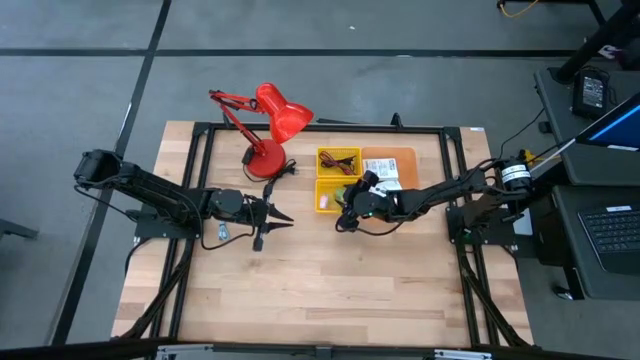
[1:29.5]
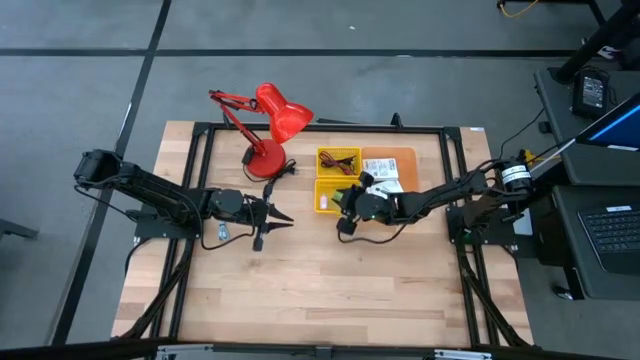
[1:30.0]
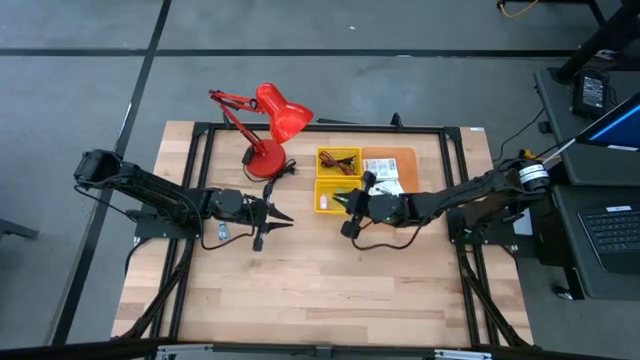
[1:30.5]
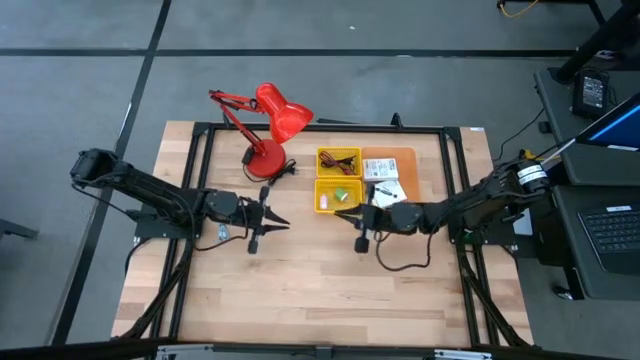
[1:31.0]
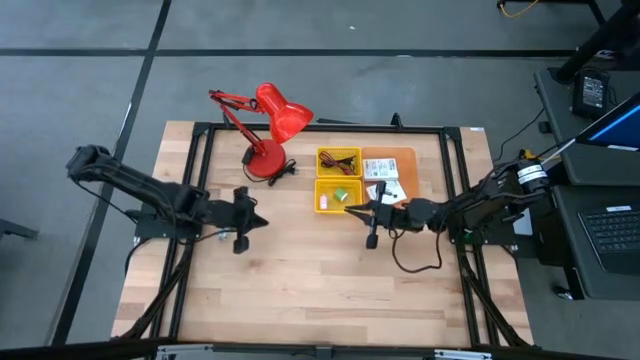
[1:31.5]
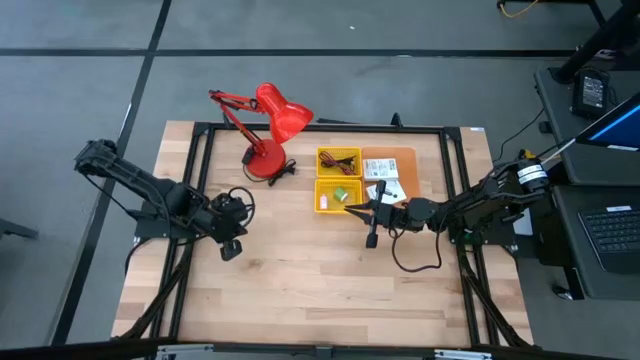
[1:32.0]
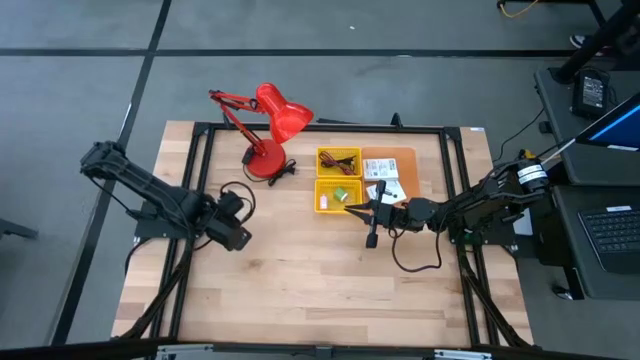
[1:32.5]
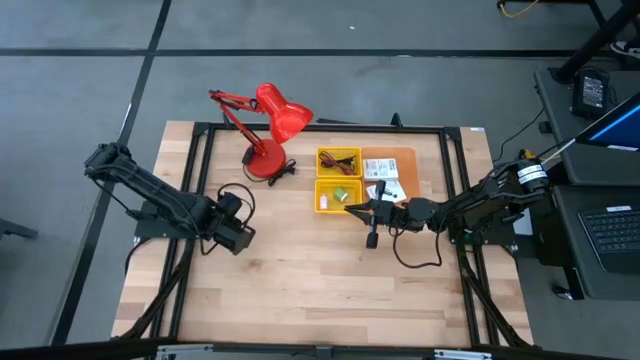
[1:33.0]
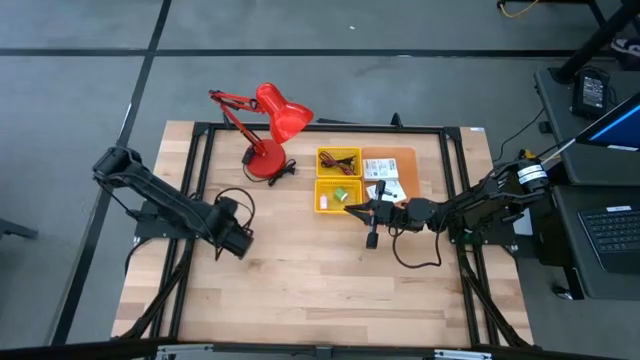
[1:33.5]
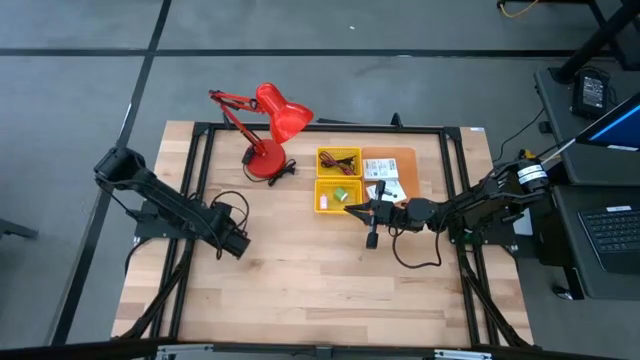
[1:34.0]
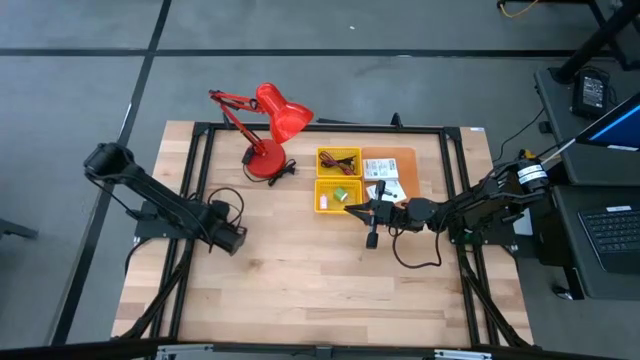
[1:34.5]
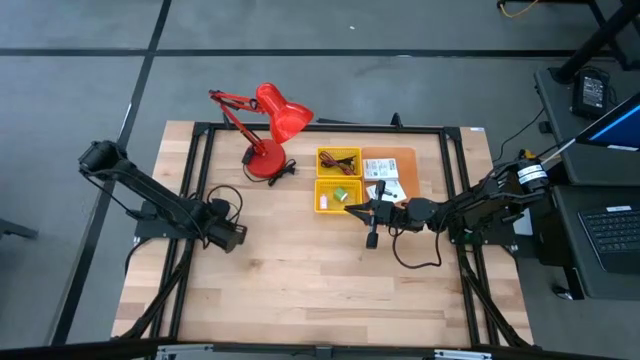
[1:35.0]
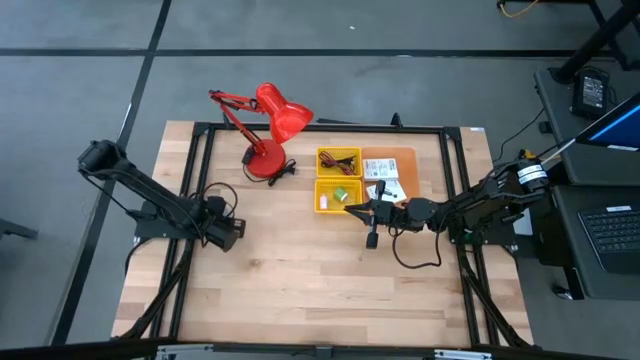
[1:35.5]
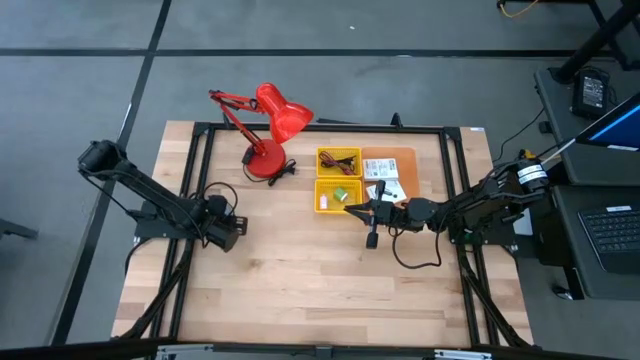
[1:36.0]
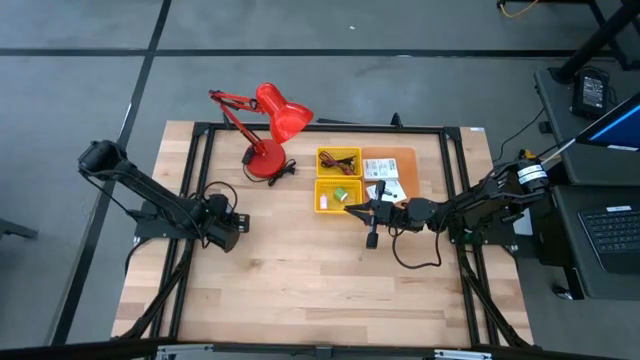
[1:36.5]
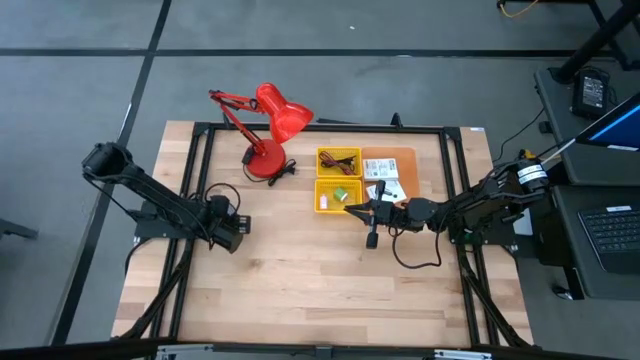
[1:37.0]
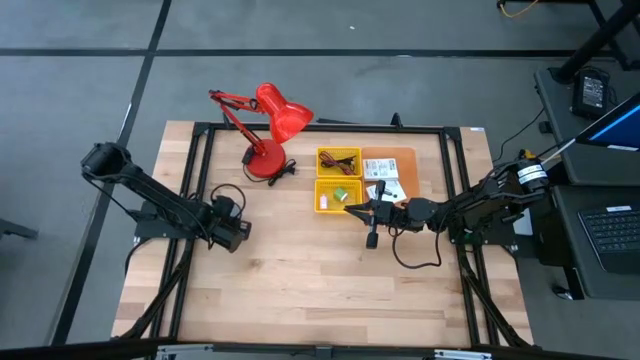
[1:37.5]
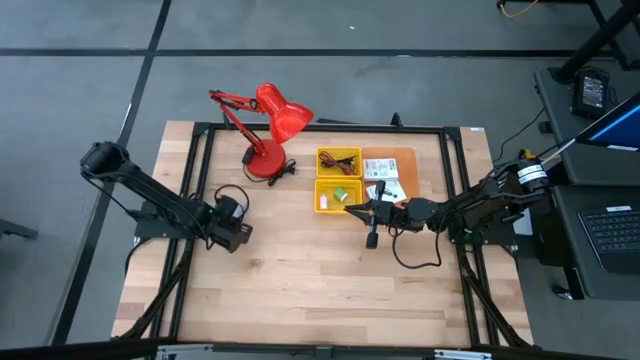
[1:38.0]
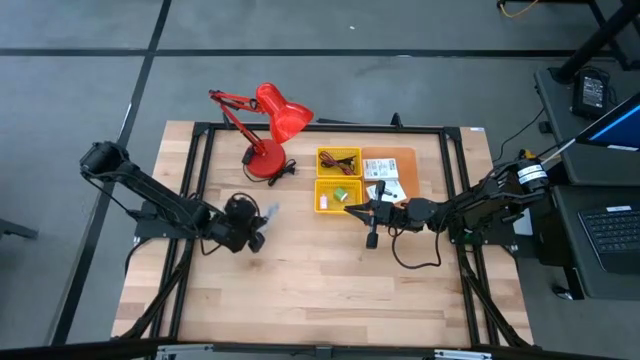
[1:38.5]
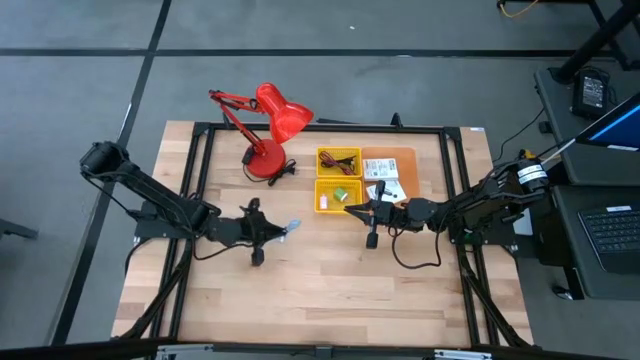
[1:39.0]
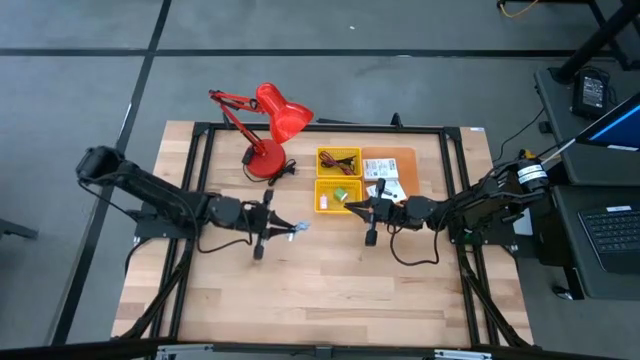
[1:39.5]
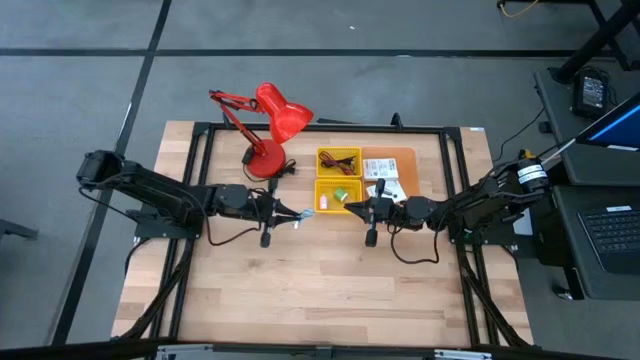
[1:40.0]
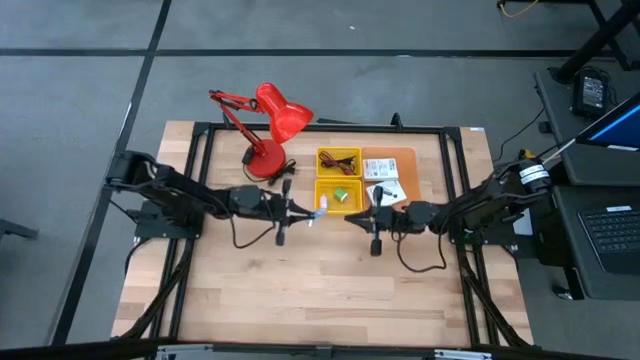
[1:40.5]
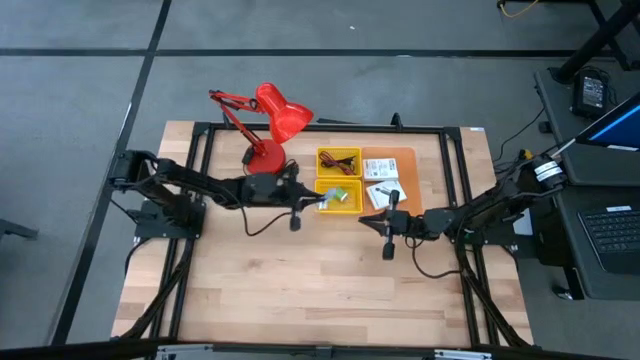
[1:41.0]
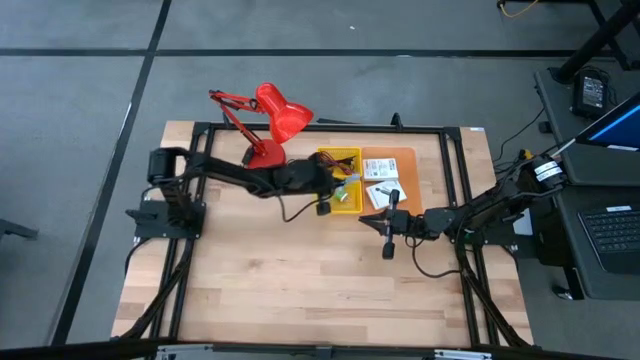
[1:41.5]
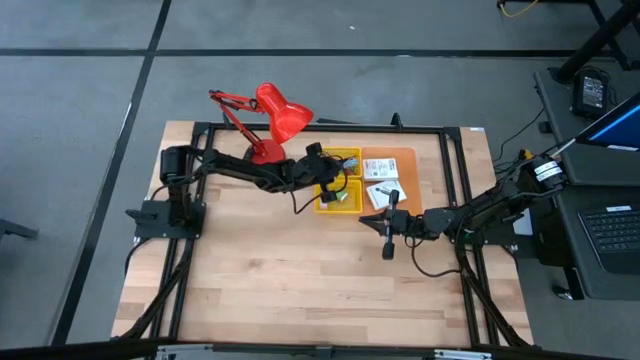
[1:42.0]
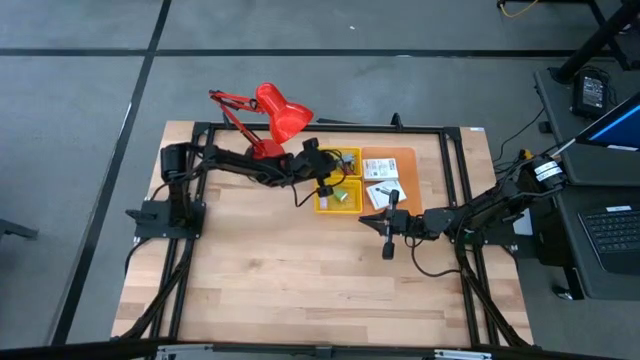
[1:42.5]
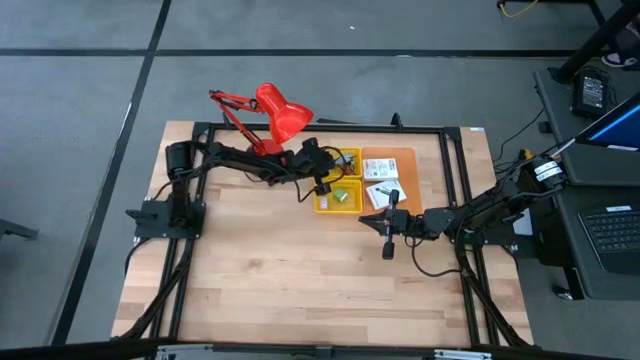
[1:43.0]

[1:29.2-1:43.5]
Task: Pick and place items into bin
Put the blue charger cable into the top yellow bin

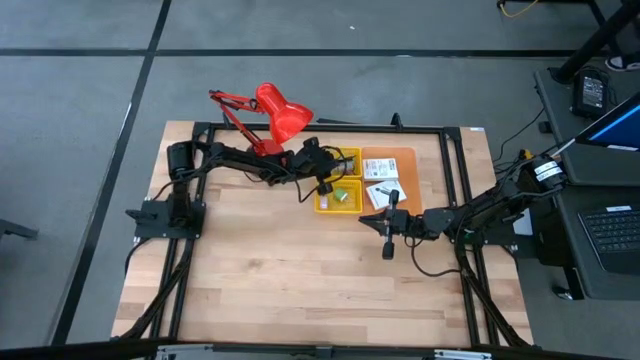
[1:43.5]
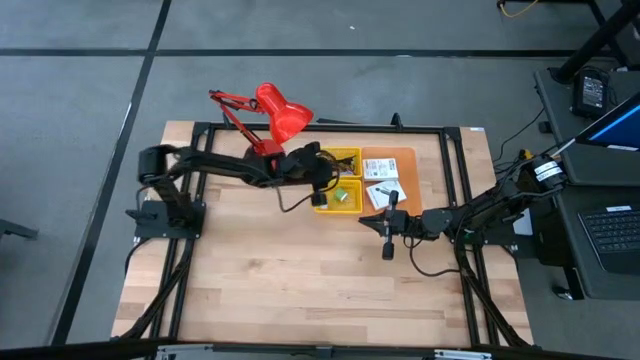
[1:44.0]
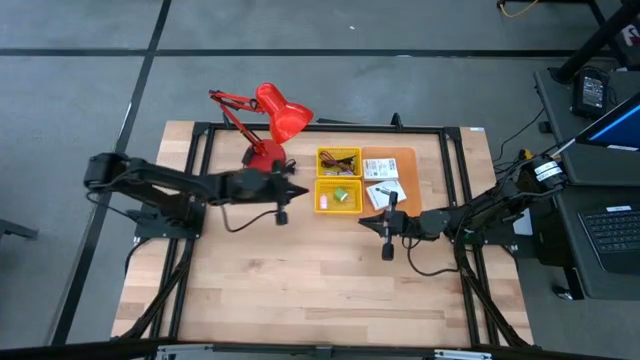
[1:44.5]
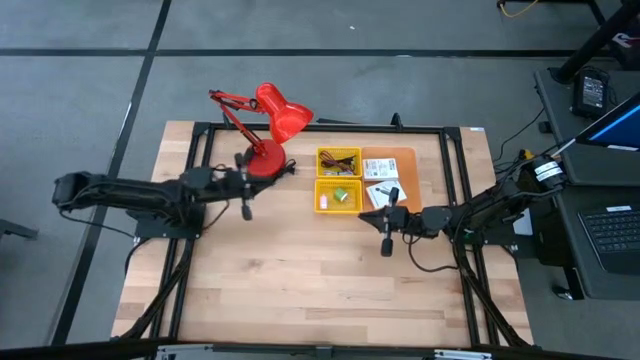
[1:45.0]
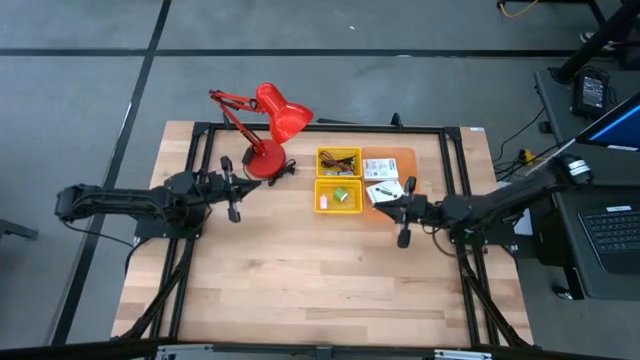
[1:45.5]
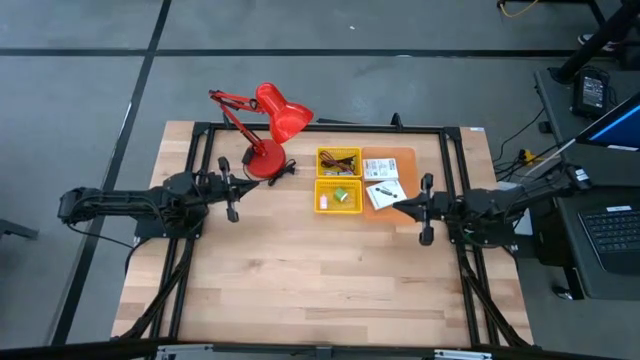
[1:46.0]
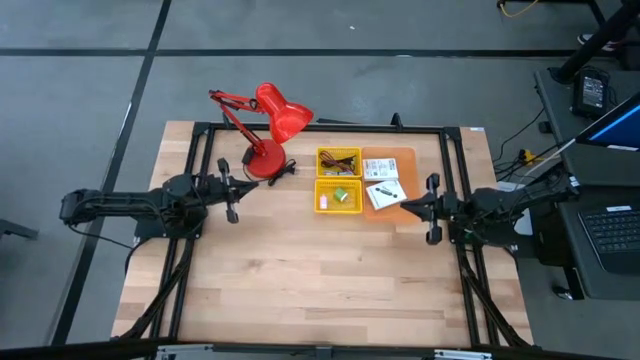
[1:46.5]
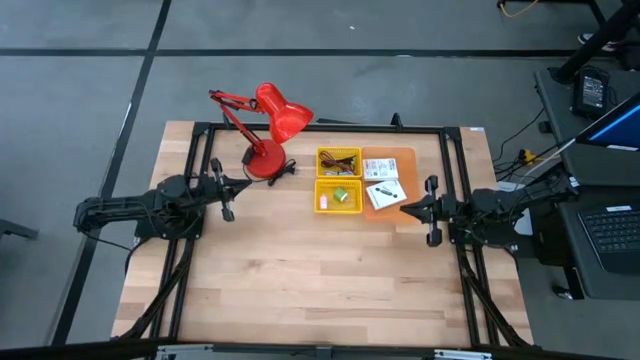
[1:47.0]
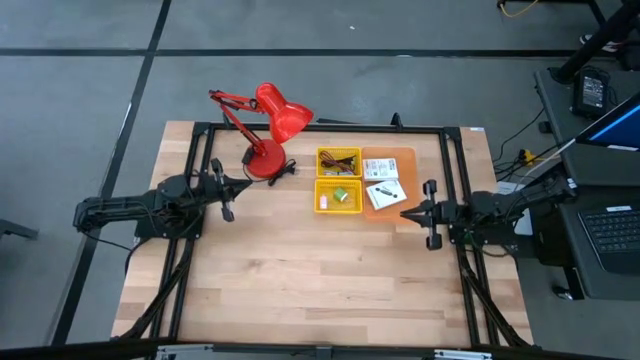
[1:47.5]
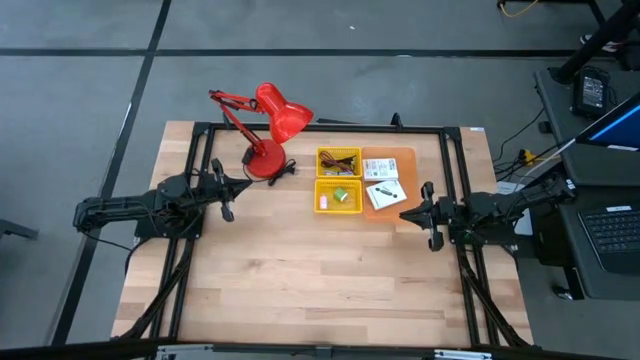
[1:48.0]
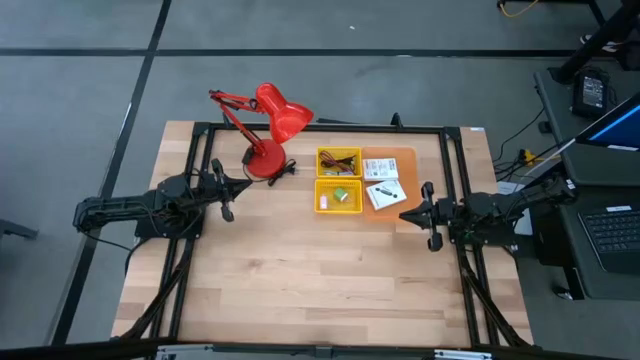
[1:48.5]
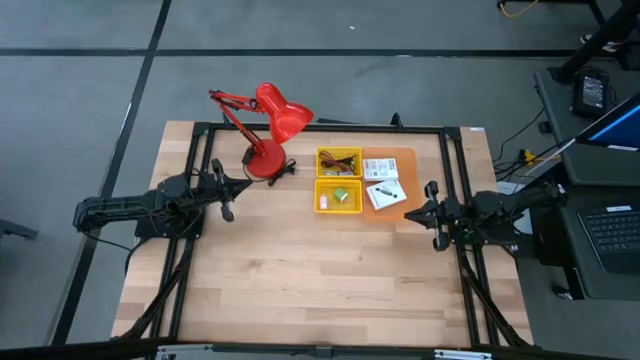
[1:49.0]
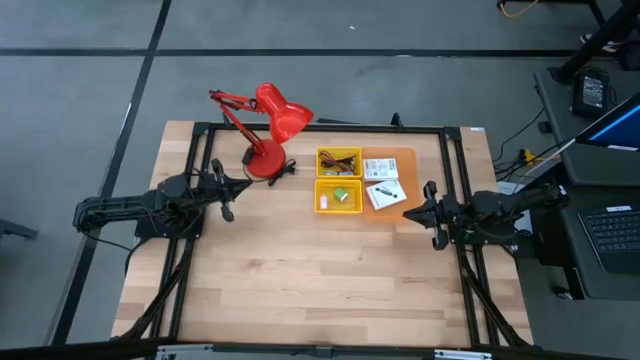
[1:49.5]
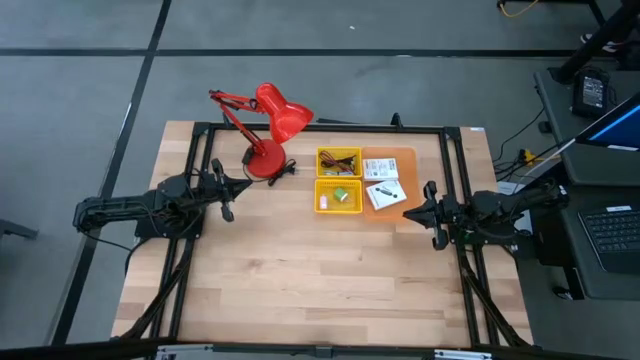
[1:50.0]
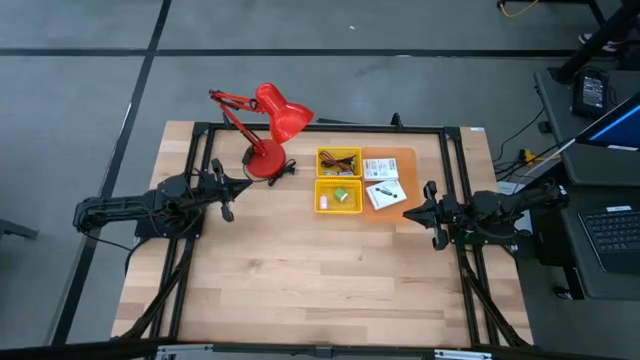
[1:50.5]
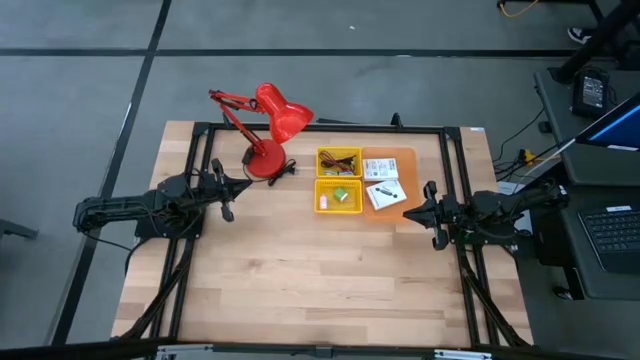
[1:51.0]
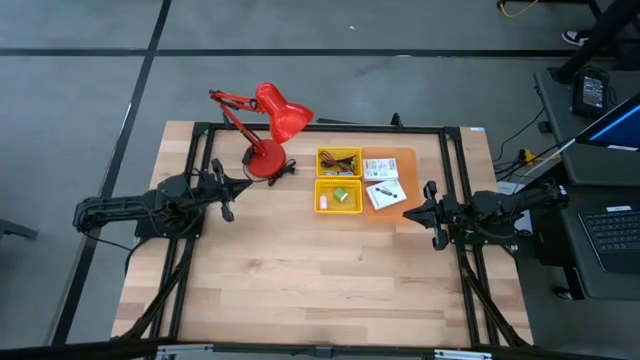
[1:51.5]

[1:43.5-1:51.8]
Return to Home Position
